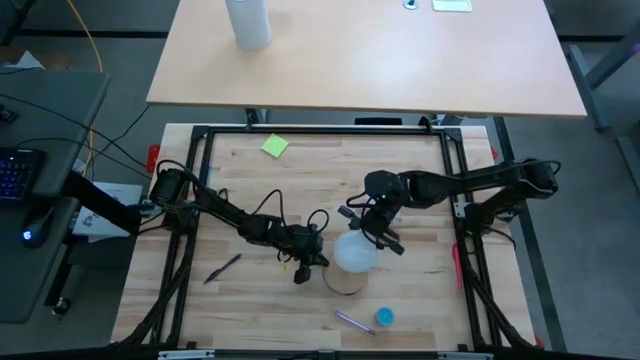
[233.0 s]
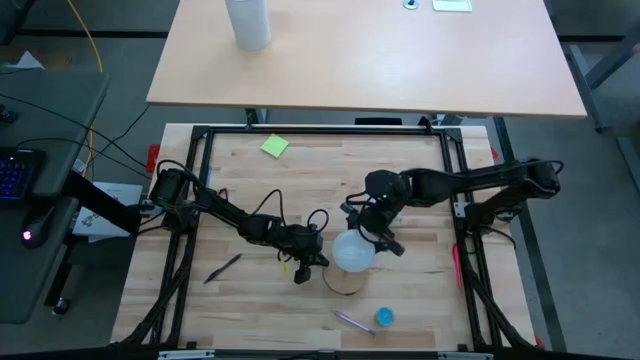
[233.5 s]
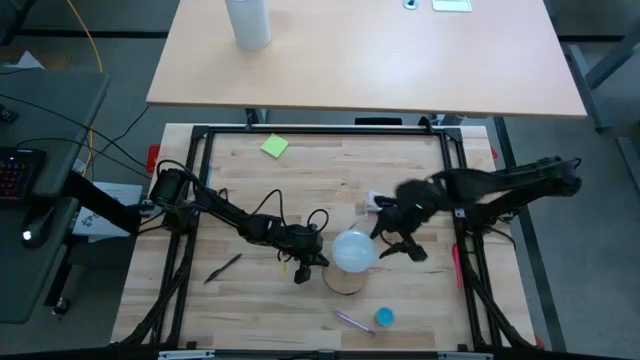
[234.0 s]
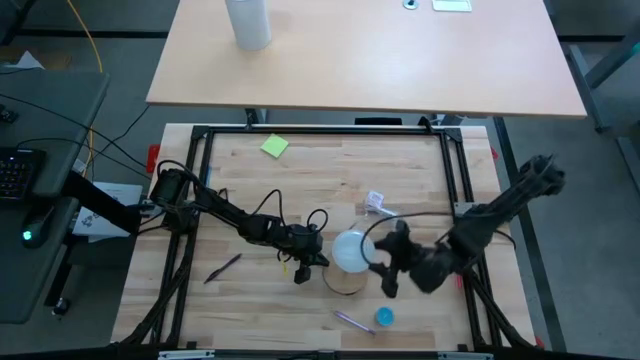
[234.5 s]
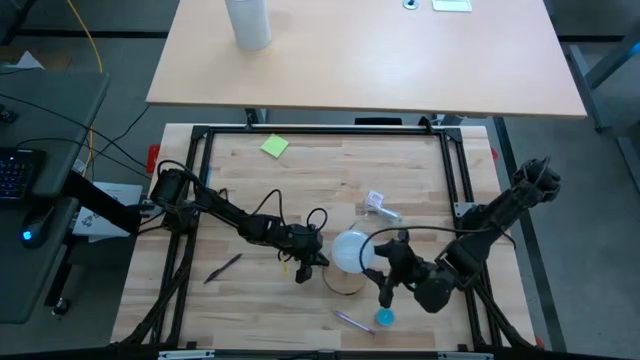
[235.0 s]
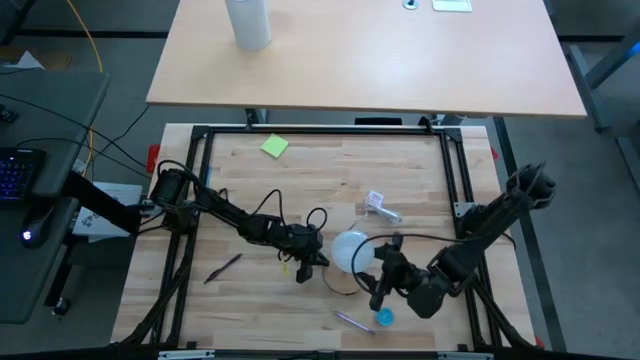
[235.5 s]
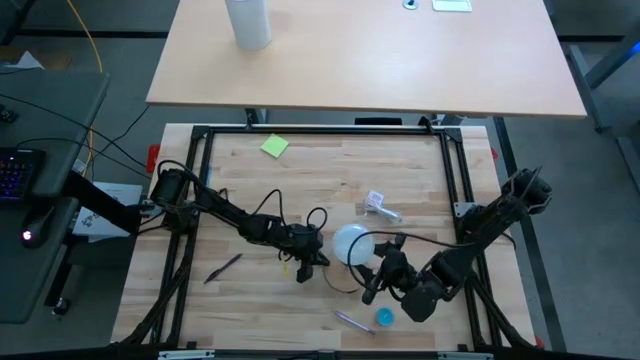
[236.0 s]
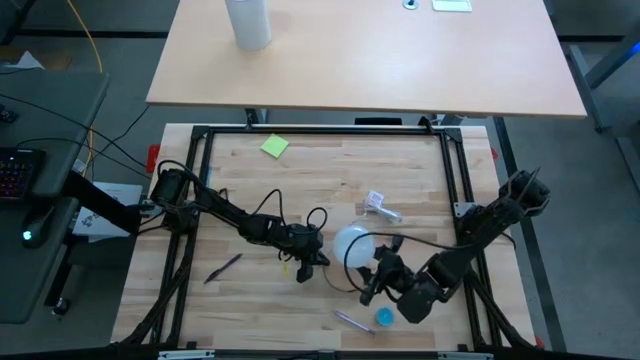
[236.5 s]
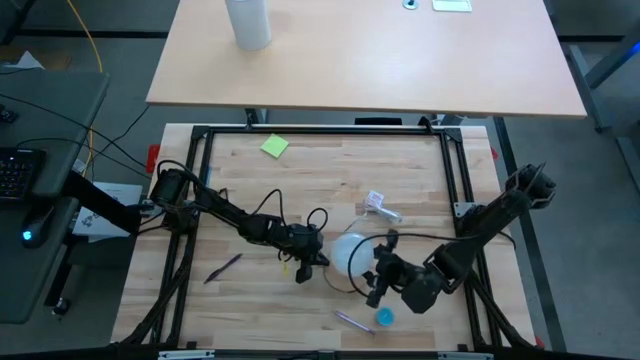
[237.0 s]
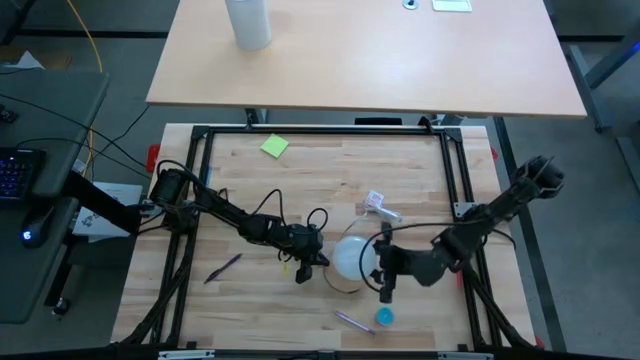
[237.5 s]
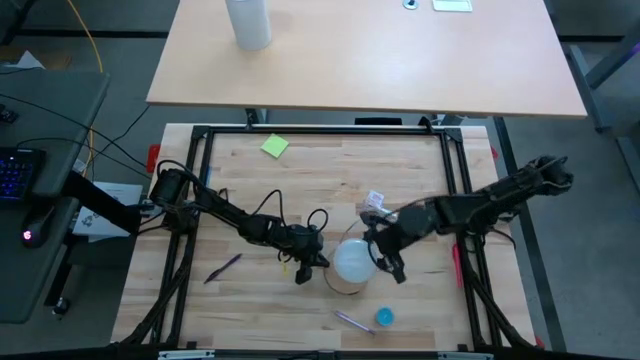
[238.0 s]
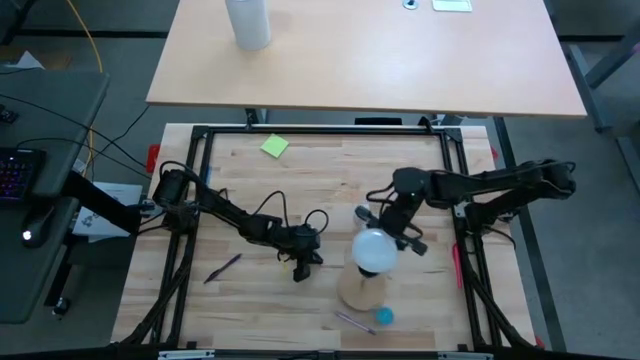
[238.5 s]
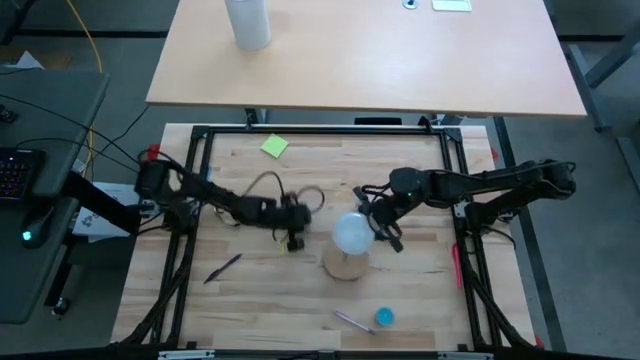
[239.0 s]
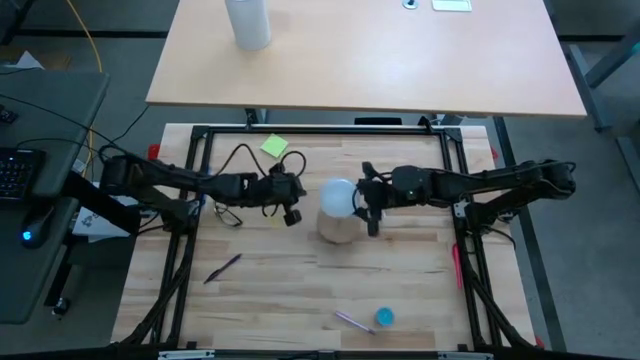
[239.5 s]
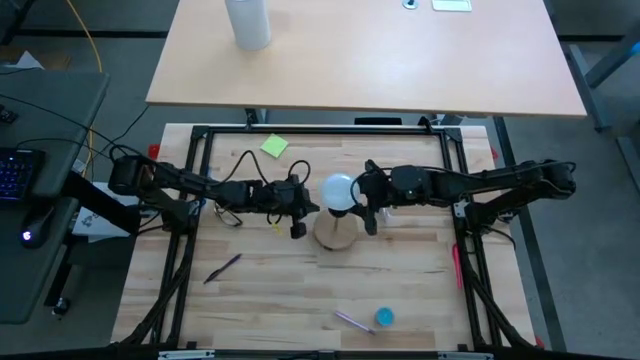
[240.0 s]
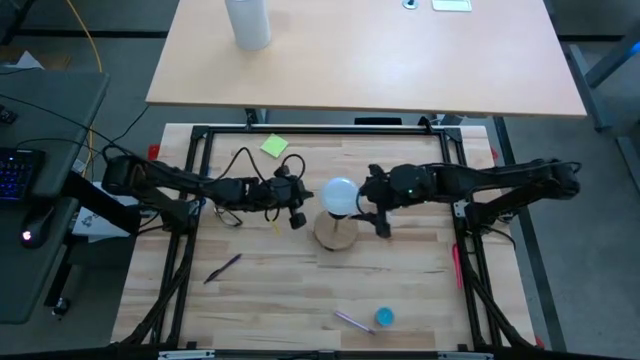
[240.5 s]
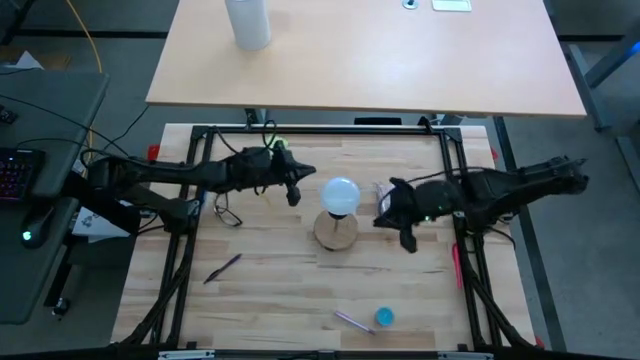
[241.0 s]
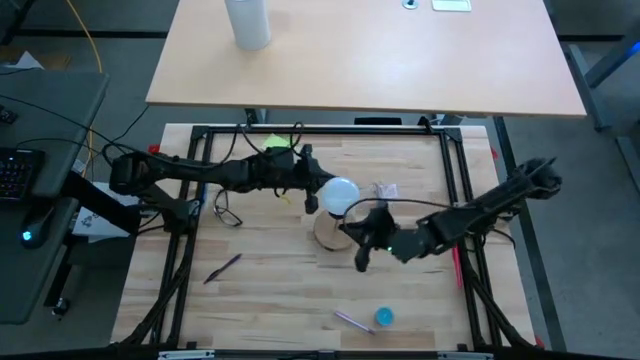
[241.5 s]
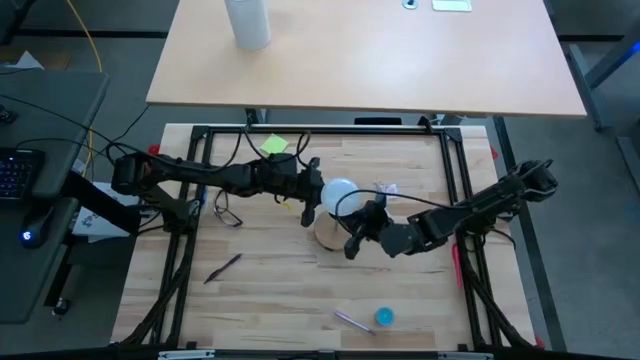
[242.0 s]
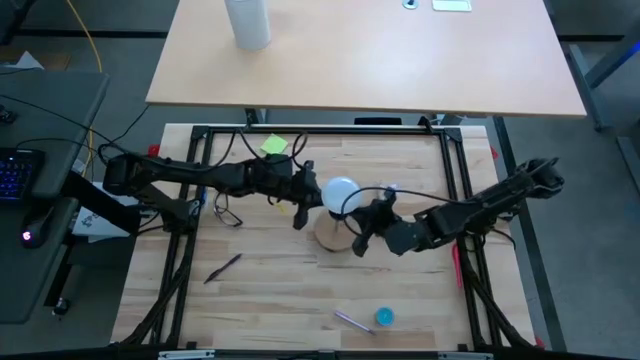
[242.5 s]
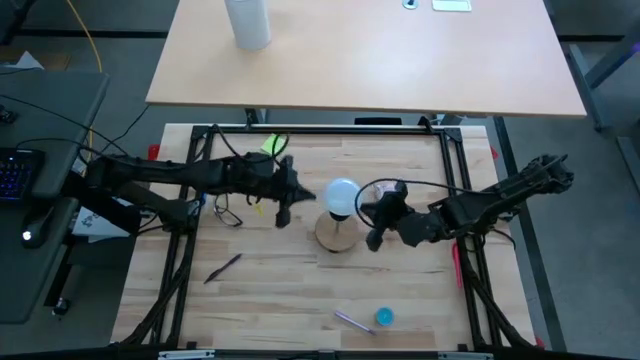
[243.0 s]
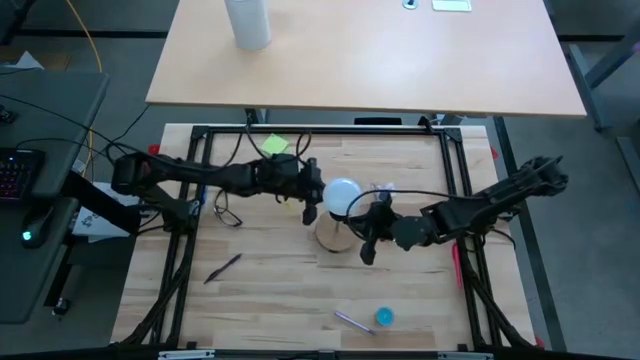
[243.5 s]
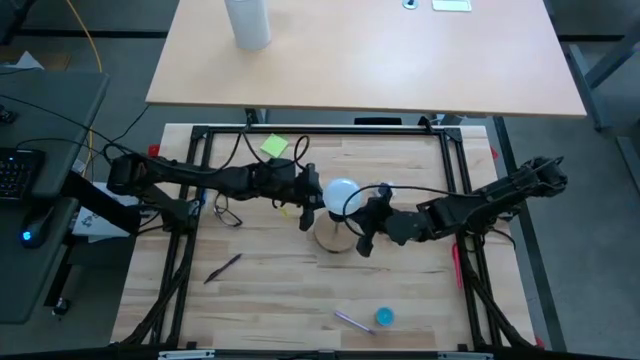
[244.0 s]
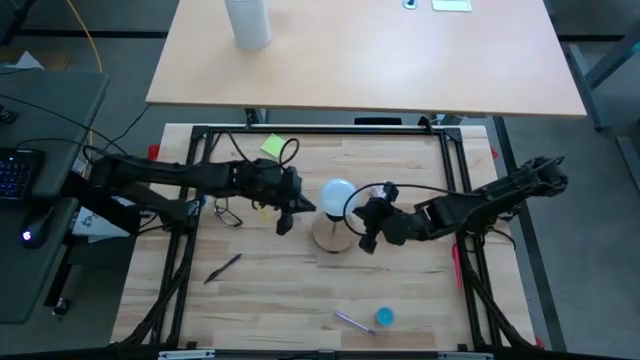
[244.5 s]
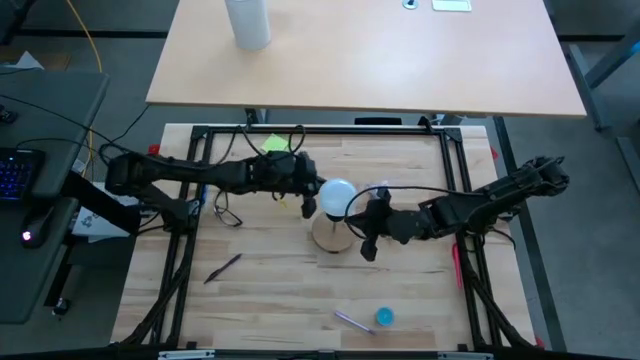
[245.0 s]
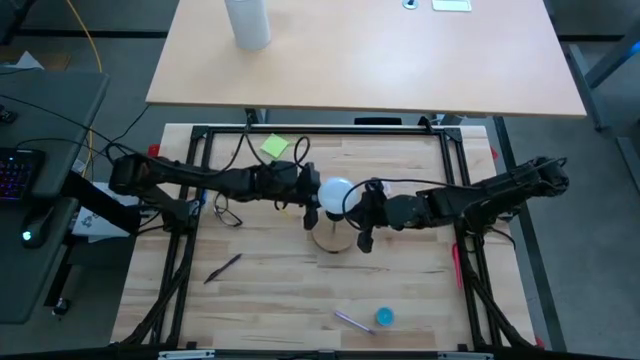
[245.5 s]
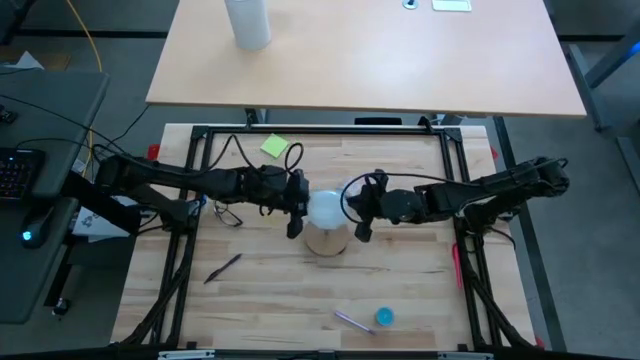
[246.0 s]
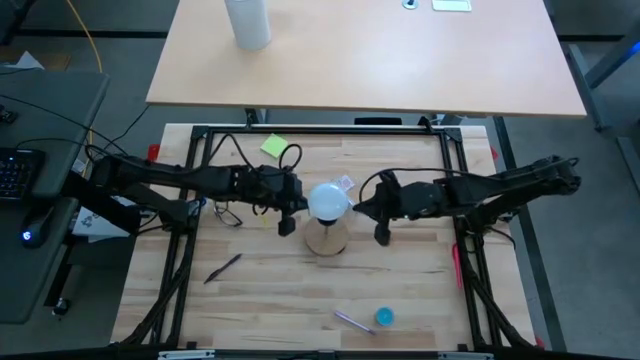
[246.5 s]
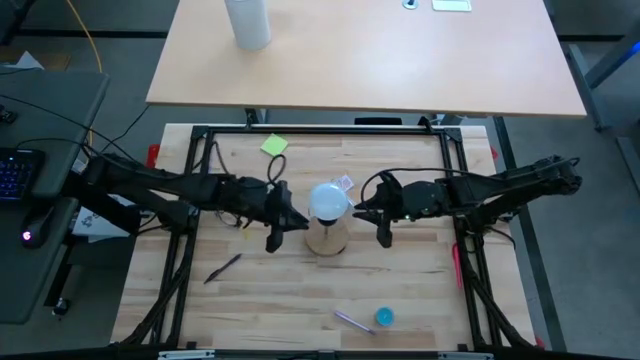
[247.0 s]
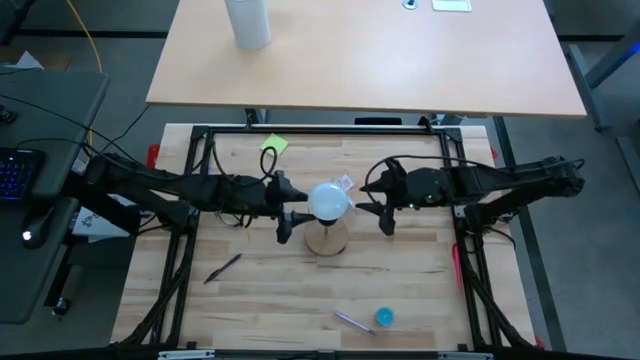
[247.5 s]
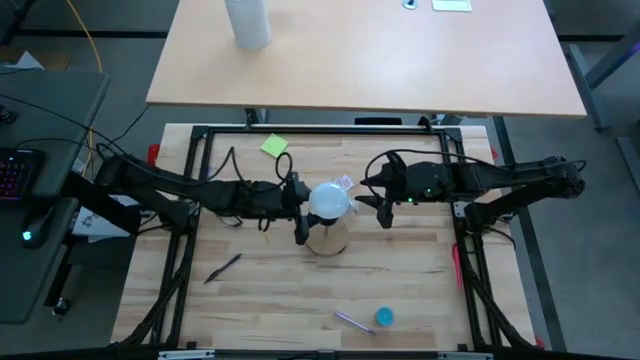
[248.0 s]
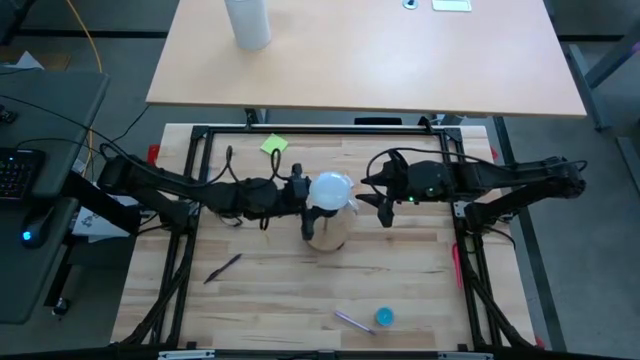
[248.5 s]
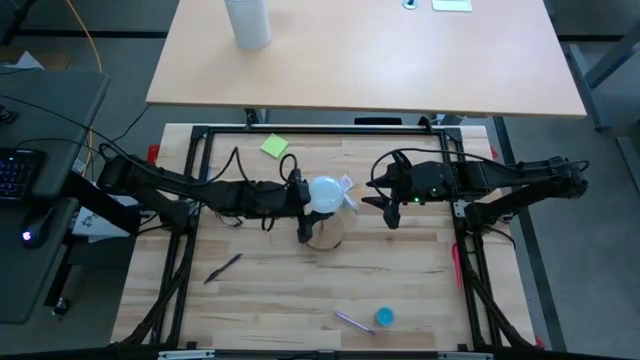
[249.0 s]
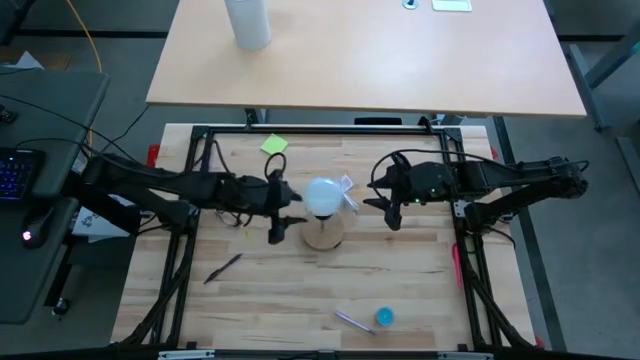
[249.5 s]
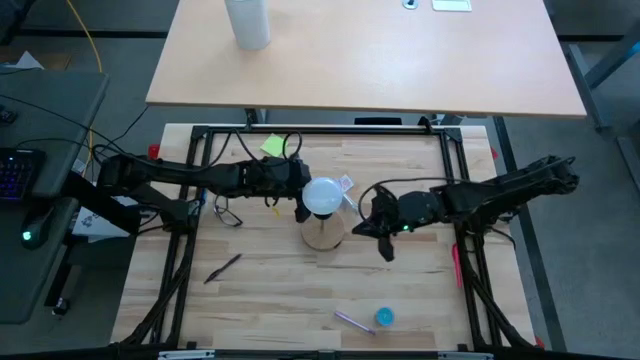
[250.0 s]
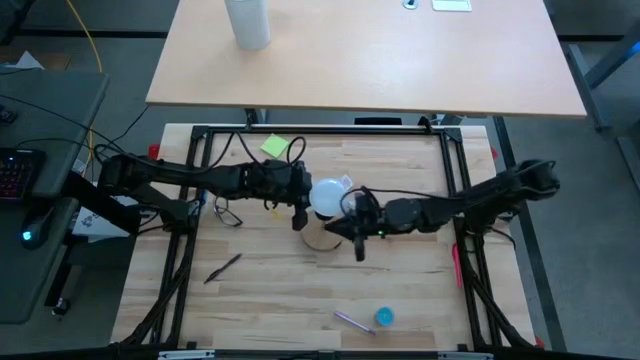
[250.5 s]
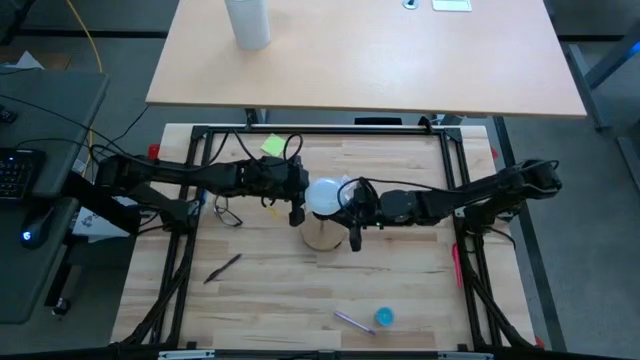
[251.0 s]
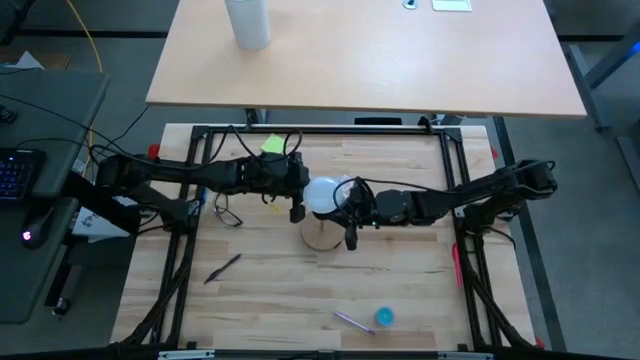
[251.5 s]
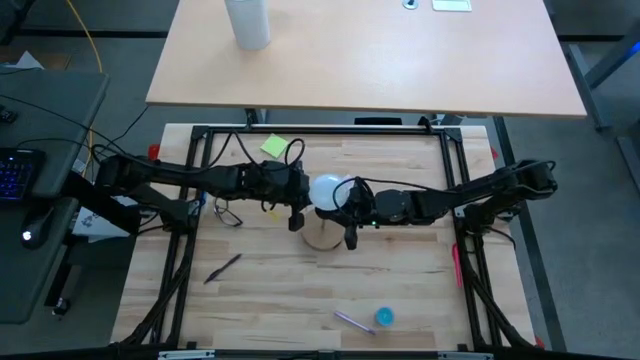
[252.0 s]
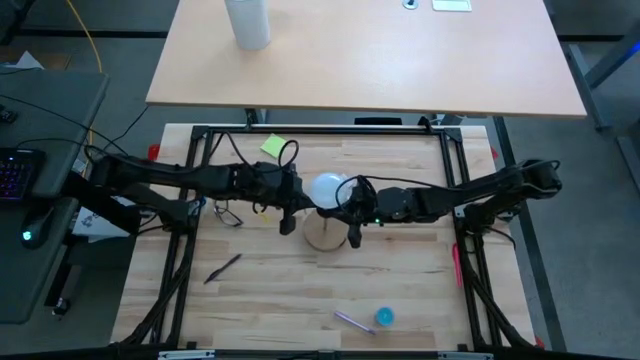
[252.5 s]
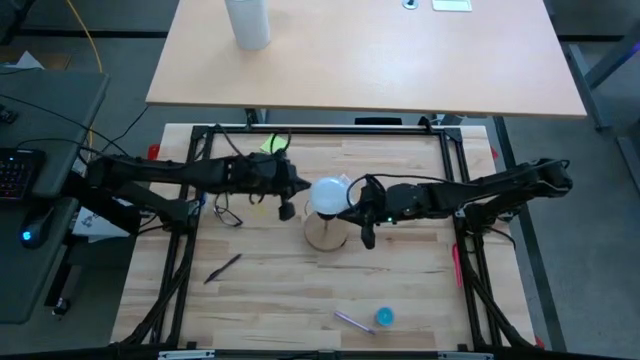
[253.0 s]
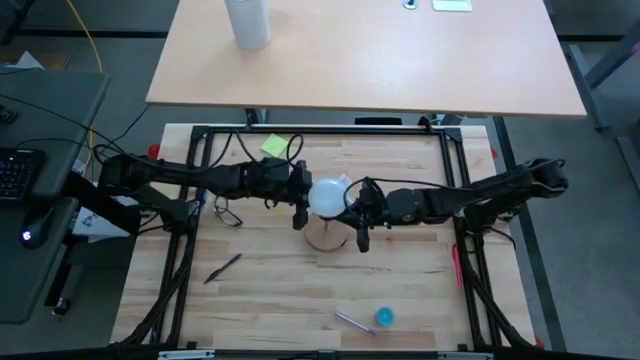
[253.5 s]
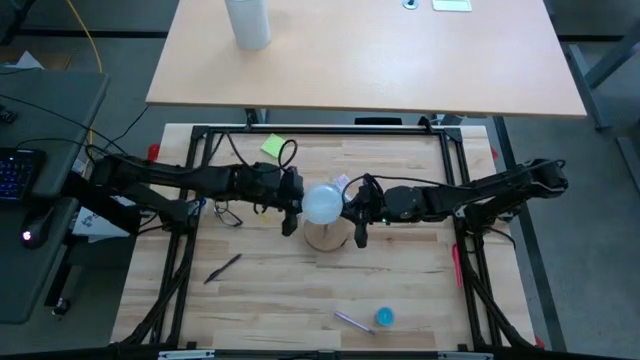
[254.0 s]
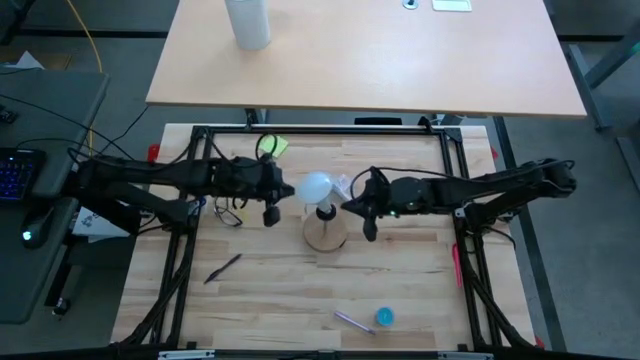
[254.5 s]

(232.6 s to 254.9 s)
Task: Screw lightbulb
Remove the lightbulb from the lamp
